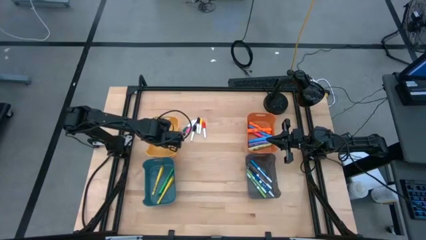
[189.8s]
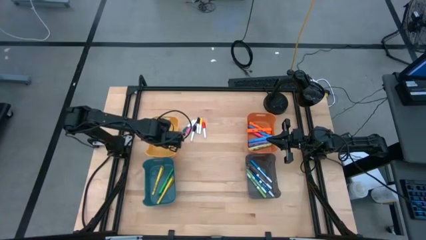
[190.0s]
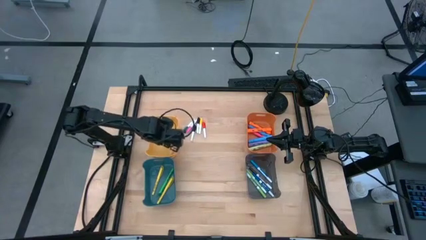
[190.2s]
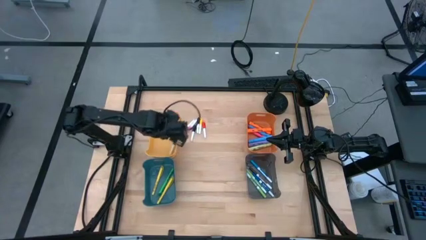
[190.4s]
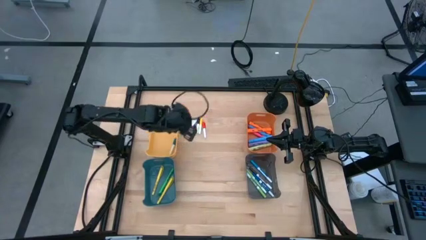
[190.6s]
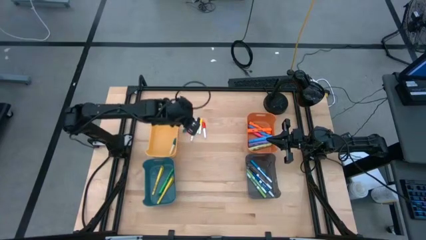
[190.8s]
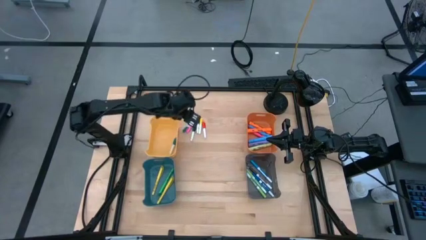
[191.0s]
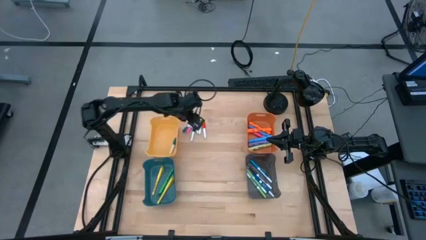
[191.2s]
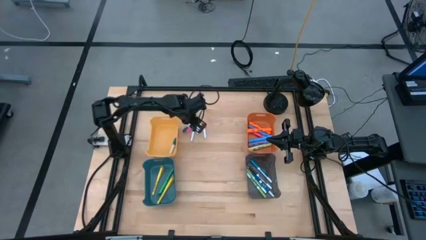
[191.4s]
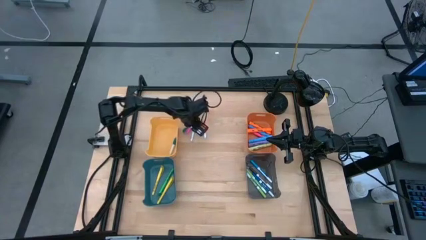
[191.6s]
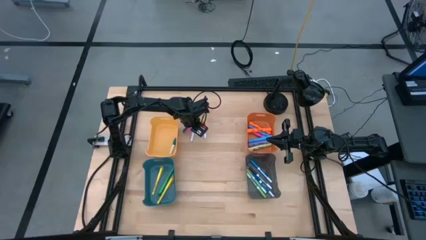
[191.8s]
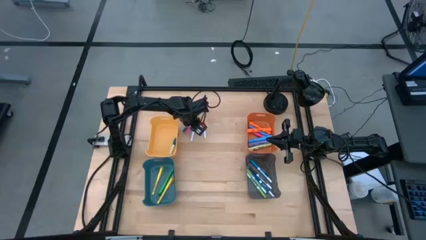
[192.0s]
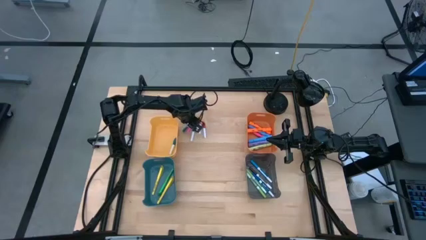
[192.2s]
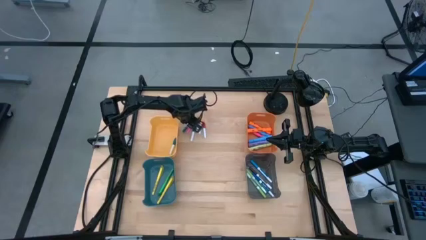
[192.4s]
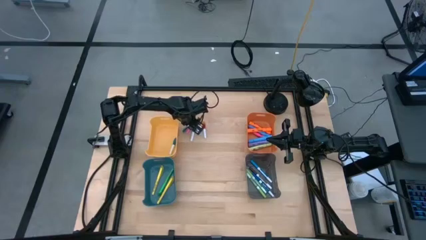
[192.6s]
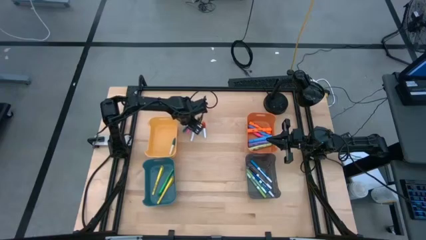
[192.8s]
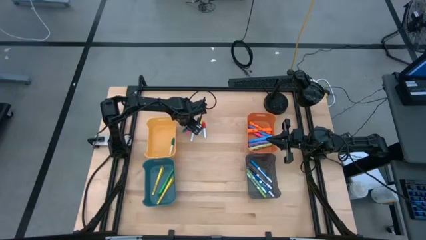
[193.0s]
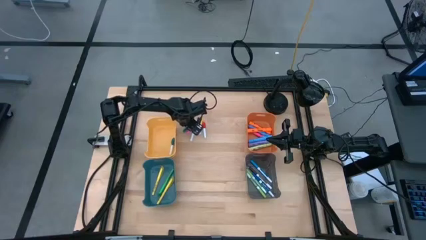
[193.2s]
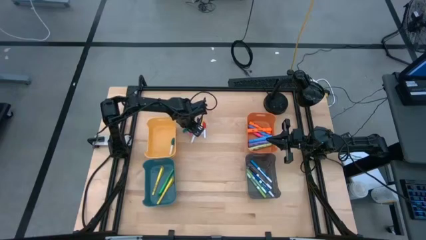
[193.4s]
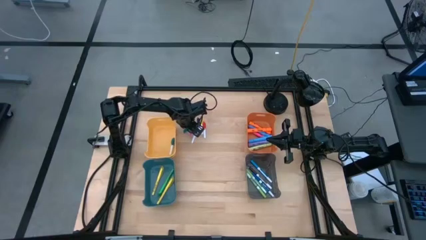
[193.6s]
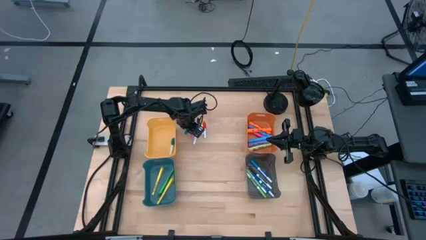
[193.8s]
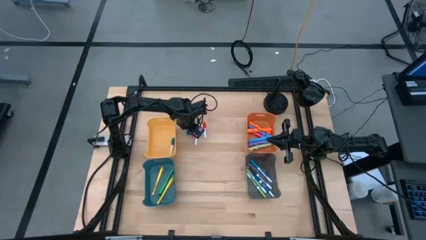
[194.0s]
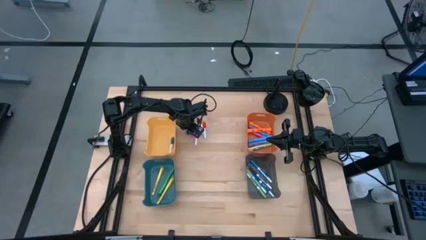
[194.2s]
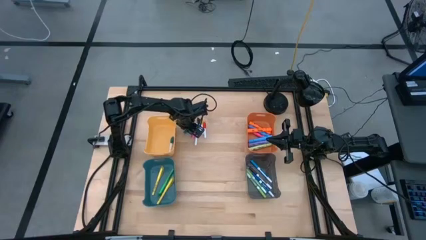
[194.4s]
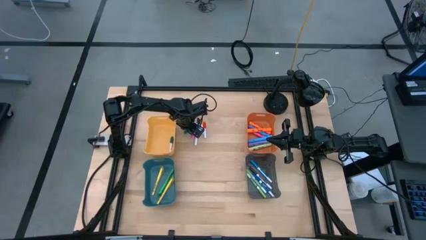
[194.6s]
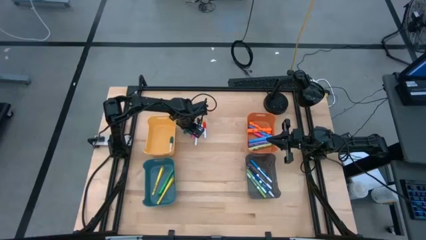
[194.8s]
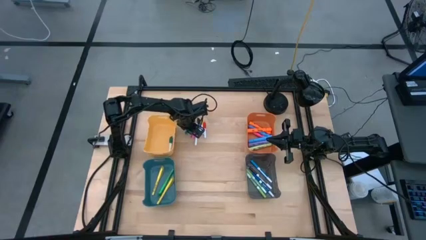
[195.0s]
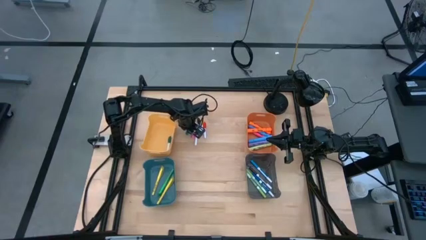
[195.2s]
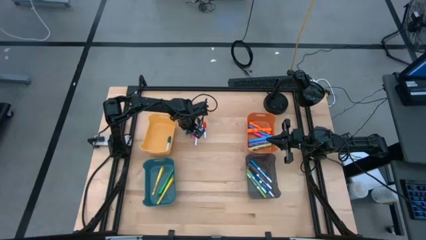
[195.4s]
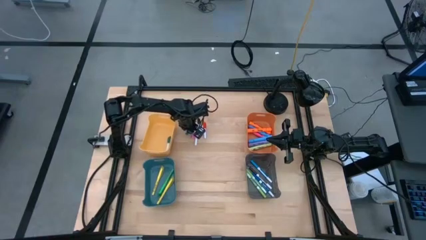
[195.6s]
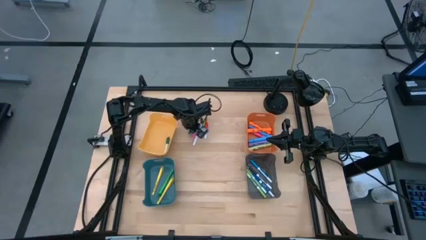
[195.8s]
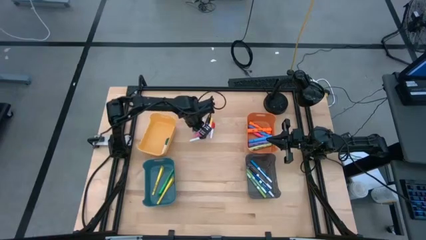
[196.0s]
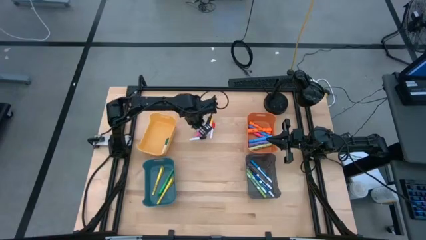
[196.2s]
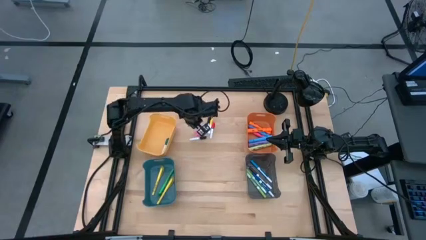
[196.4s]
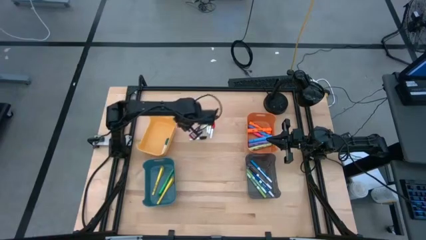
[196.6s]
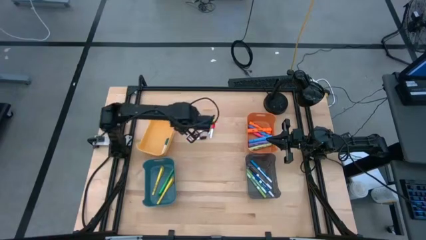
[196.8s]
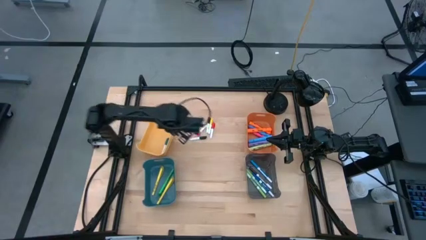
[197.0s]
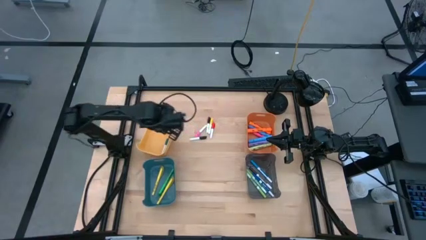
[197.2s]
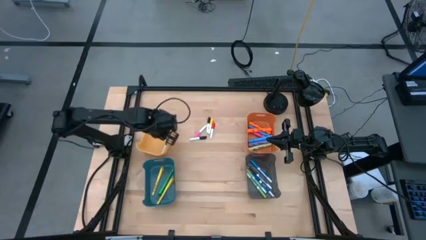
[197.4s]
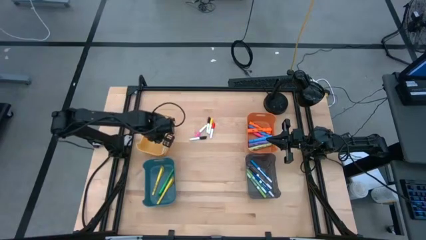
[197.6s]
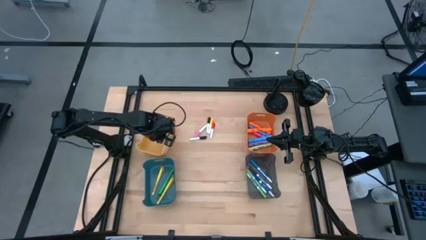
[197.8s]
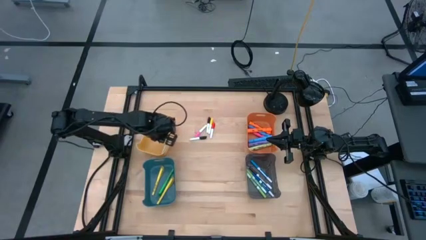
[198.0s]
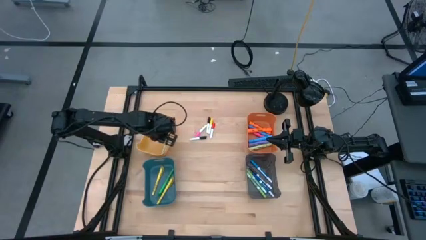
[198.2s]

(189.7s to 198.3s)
Task: Pick & Place Markers
Put the dark green mini marker into the yellow bin

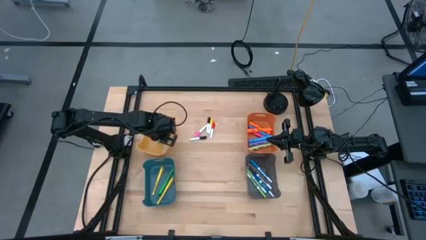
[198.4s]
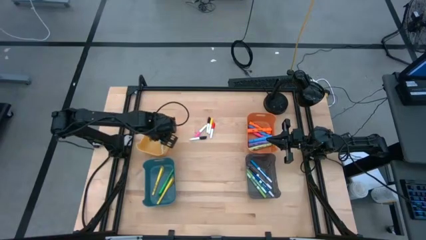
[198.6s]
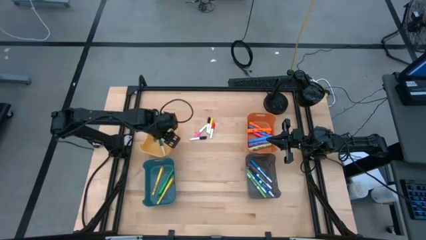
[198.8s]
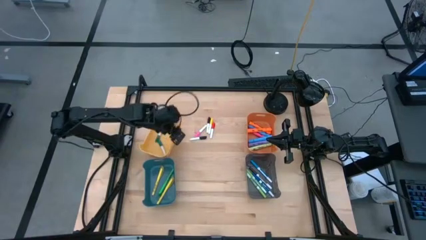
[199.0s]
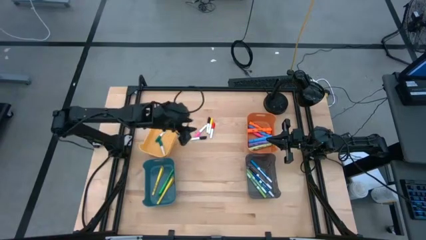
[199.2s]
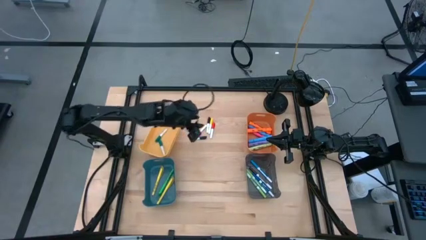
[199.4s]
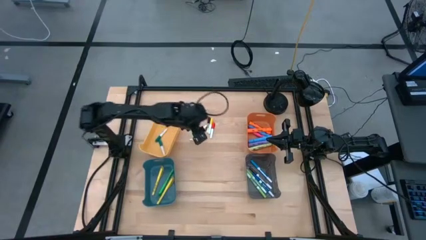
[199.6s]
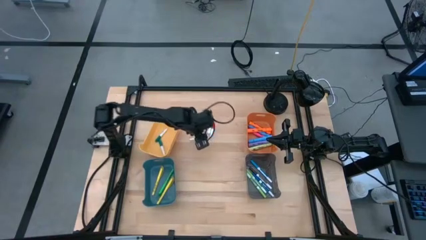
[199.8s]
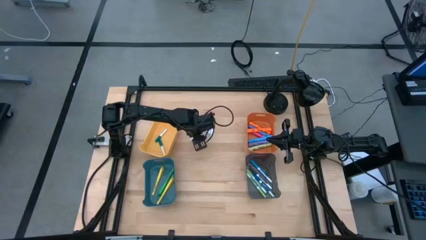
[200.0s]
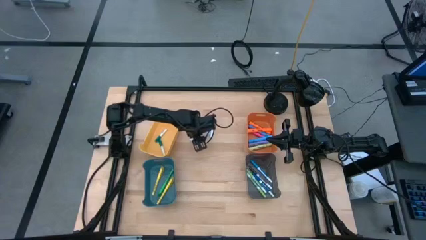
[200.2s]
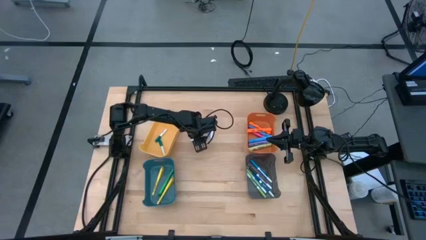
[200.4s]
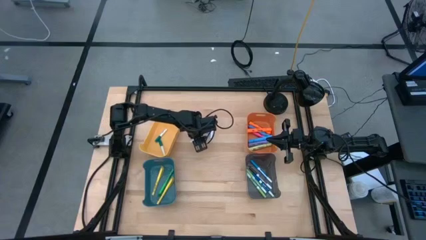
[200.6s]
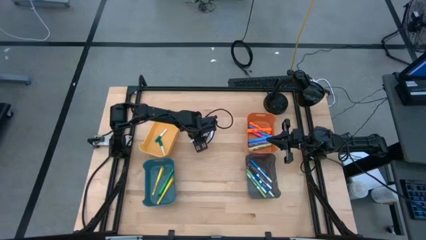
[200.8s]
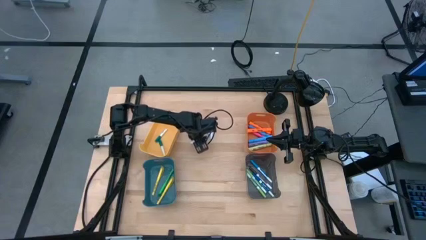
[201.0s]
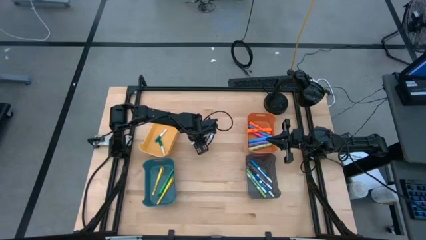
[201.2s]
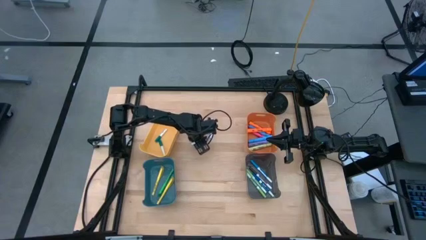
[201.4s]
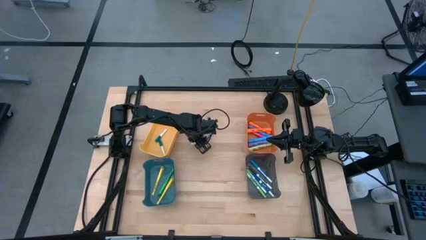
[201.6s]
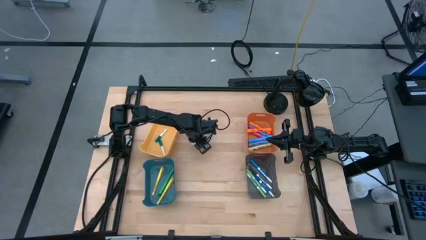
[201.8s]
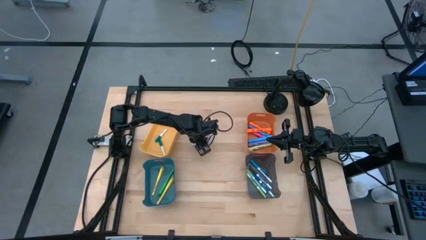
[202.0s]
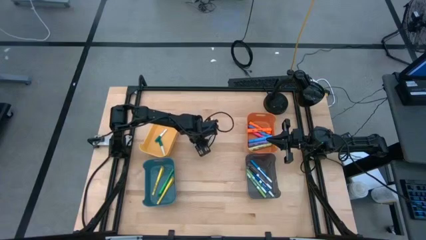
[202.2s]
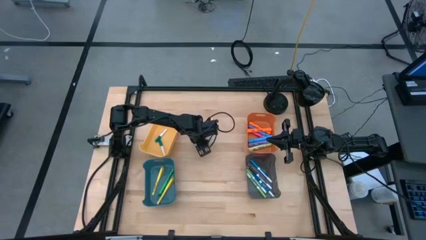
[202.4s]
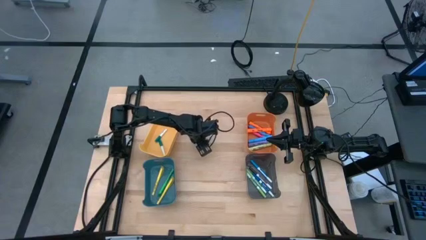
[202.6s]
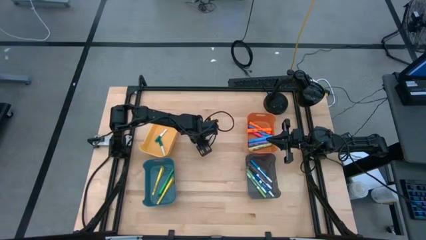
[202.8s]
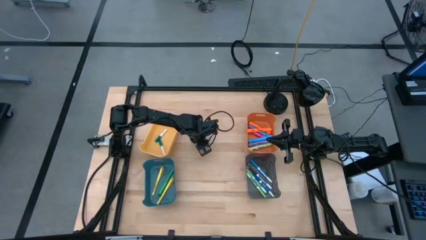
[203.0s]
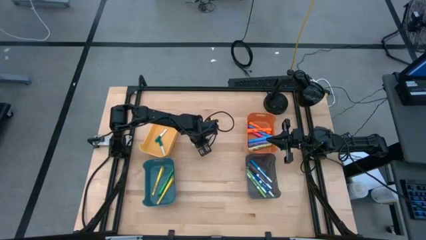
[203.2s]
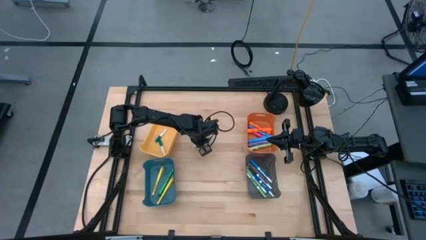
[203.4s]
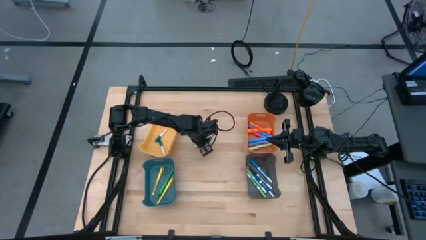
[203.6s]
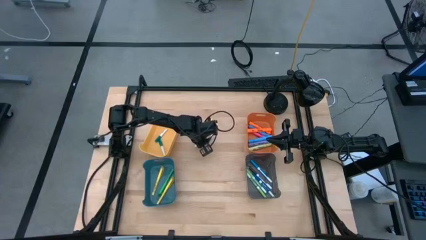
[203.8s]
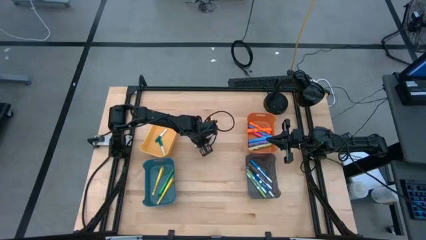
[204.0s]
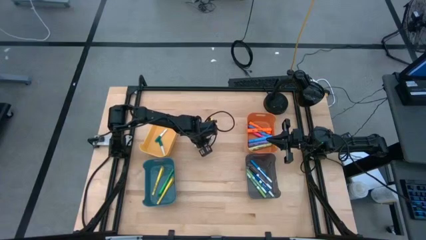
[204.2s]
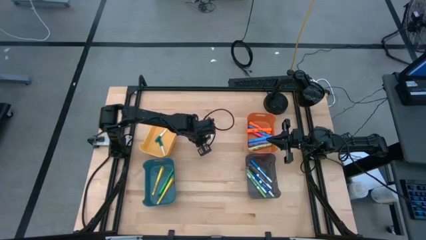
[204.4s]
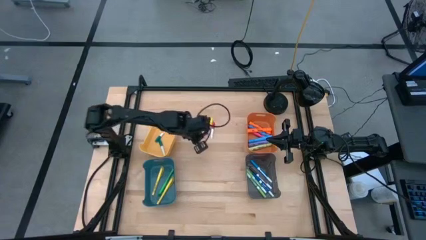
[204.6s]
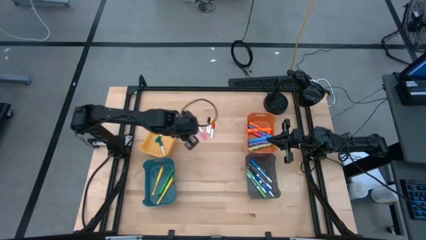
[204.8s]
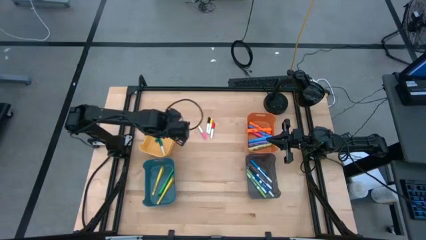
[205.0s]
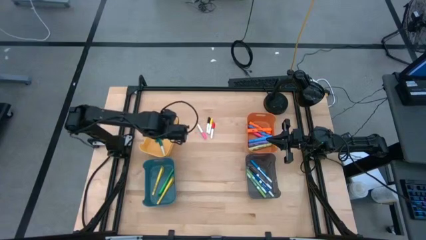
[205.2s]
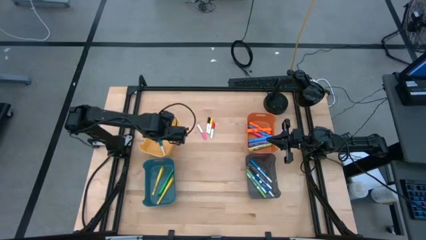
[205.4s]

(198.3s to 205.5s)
Put the bottom black mini marker into the yellow bin

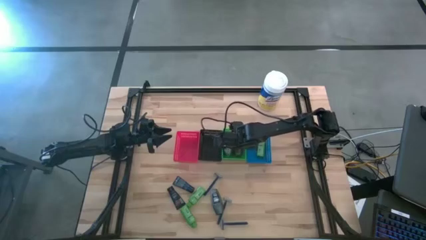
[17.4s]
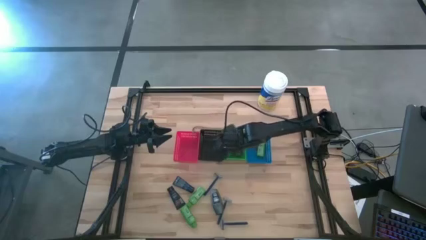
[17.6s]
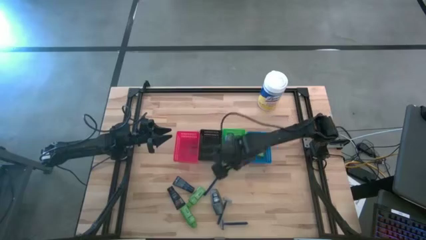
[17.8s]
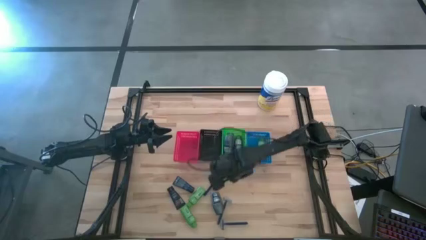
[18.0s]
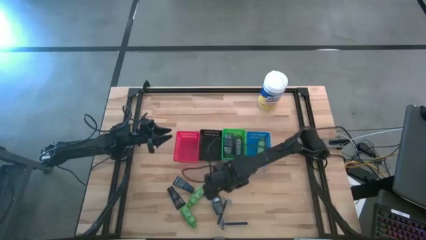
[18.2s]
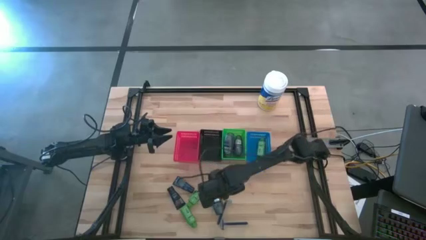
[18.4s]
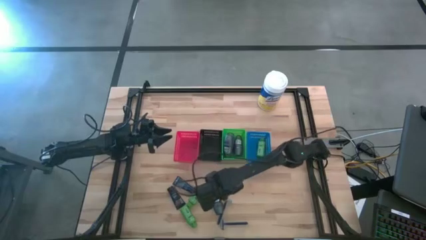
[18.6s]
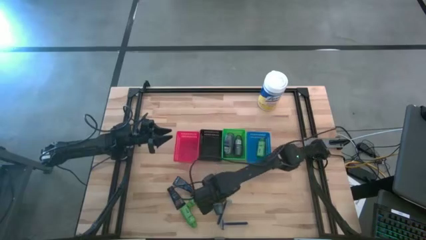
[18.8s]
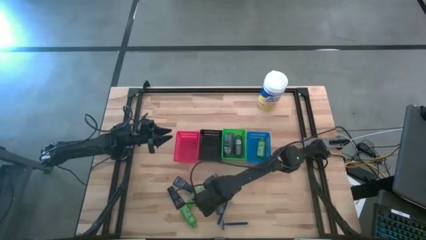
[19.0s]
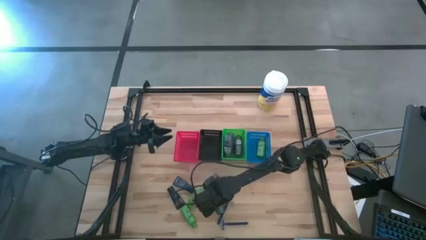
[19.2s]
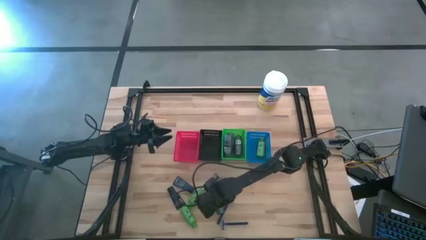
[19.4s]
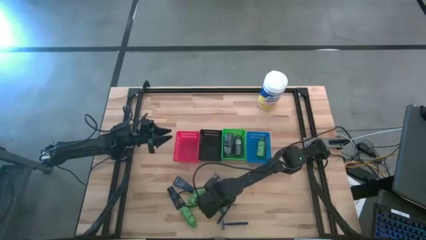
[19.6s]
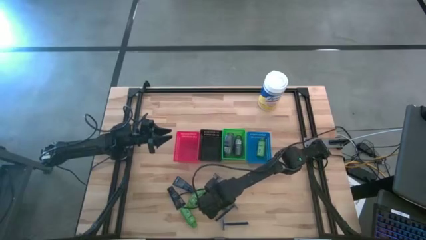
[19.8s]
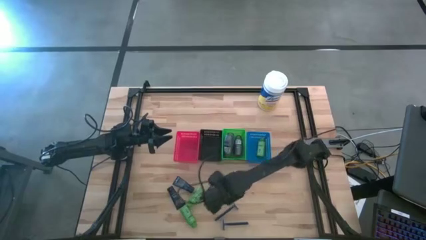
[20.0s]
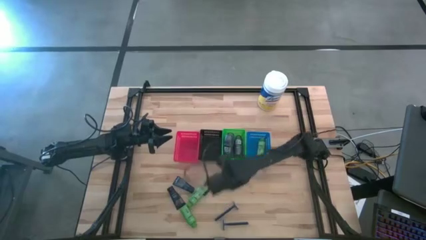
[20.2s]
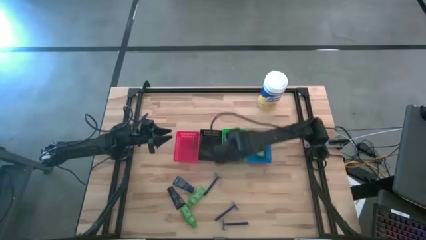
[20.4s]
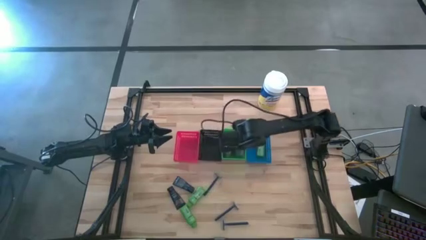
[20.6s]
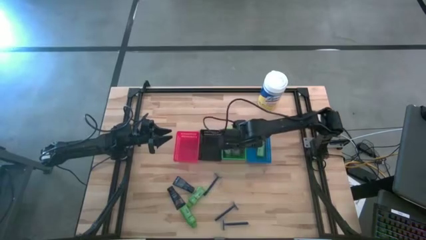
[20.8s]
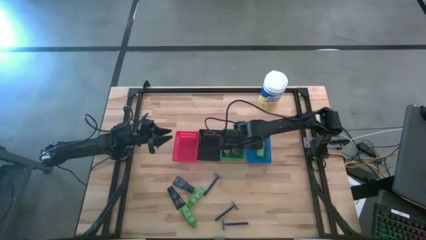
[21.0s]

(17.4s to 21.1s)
Task: Pick & Place Travel size toiletries
Put the gray deodorant into the green basket
